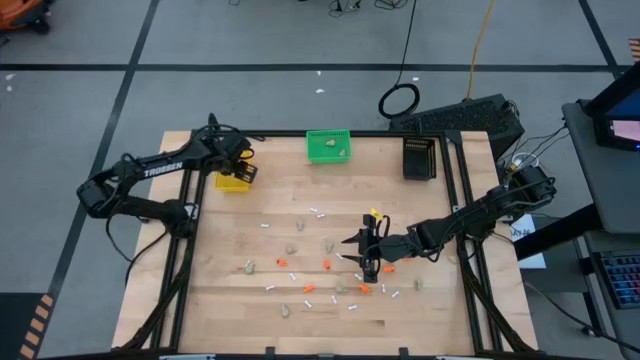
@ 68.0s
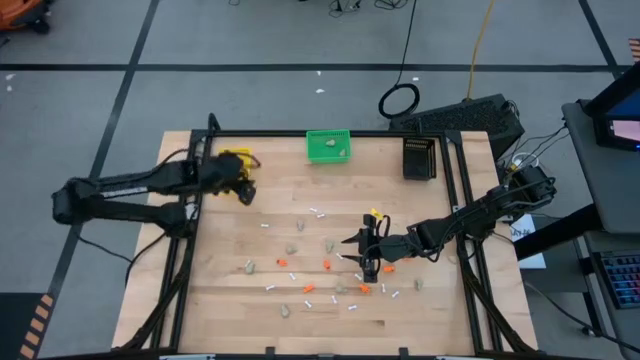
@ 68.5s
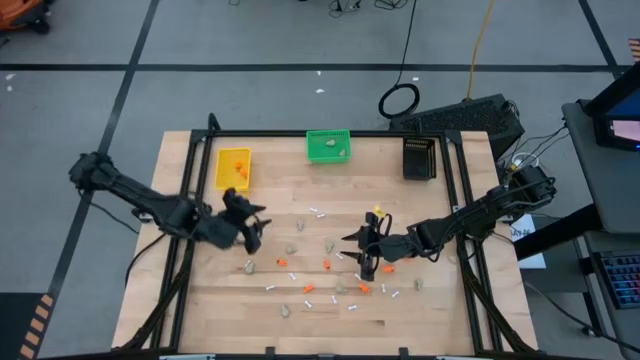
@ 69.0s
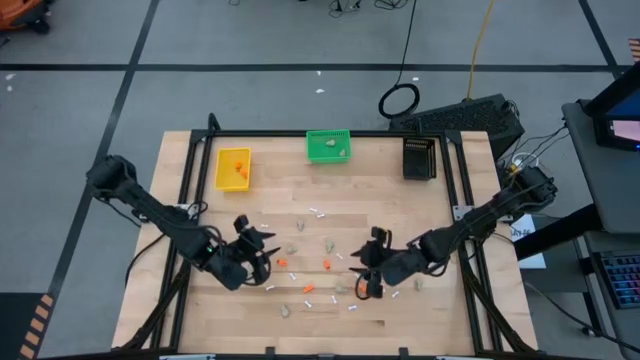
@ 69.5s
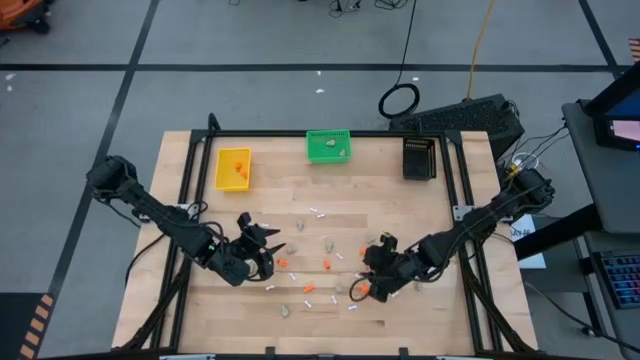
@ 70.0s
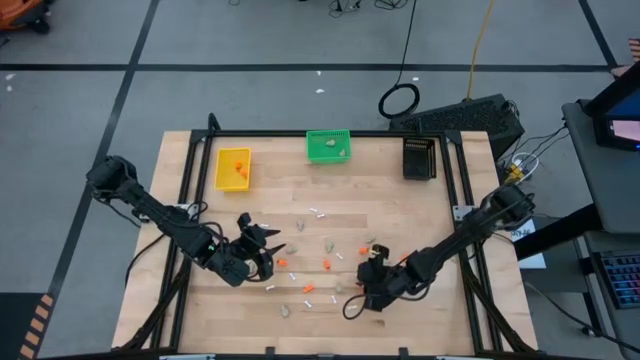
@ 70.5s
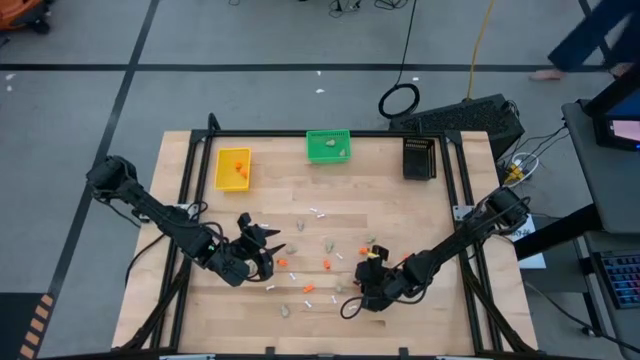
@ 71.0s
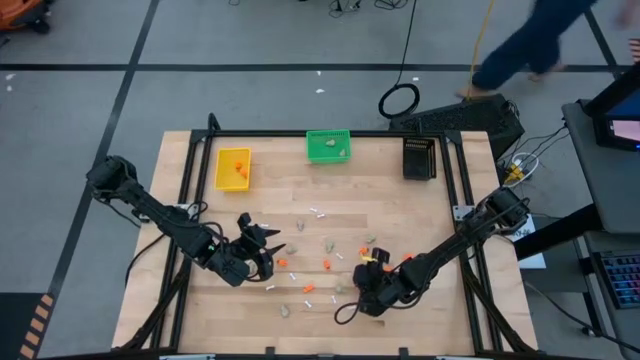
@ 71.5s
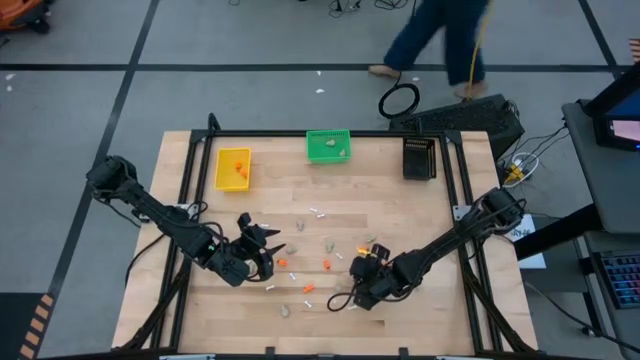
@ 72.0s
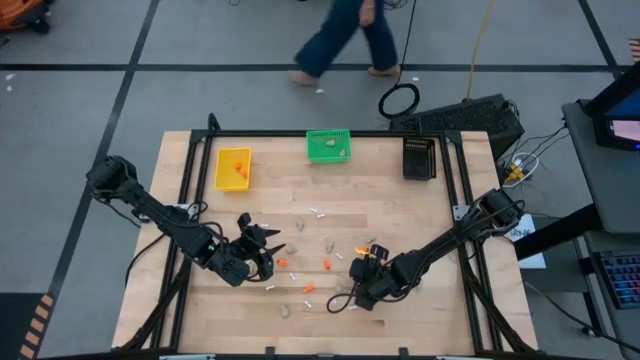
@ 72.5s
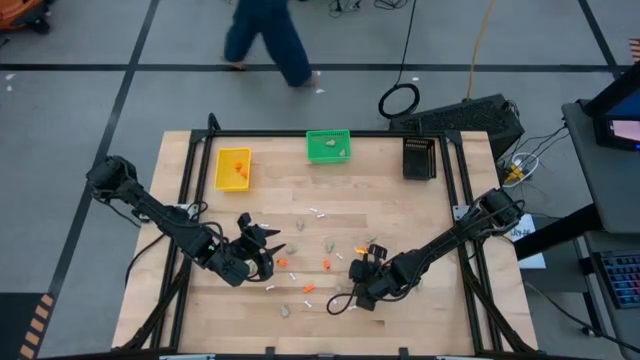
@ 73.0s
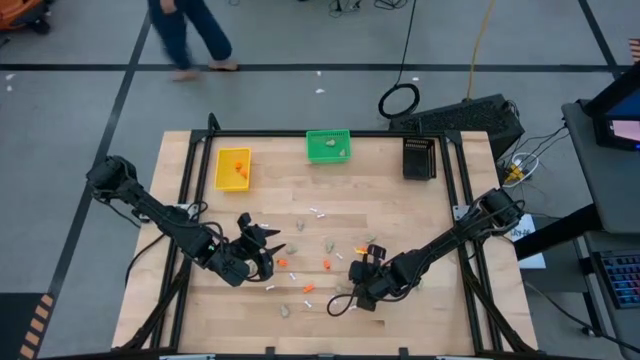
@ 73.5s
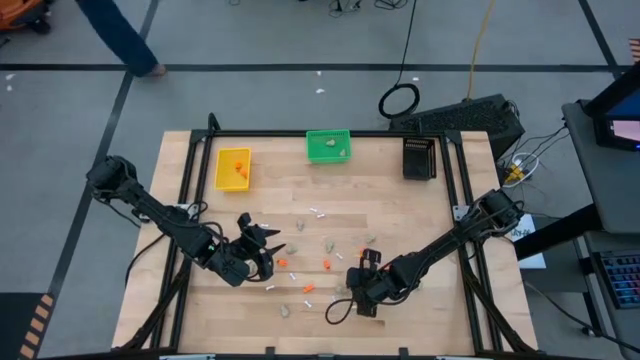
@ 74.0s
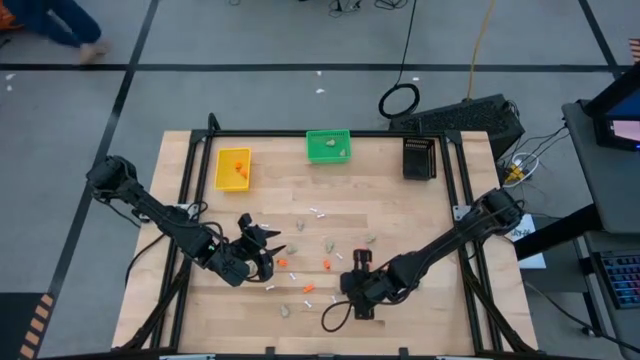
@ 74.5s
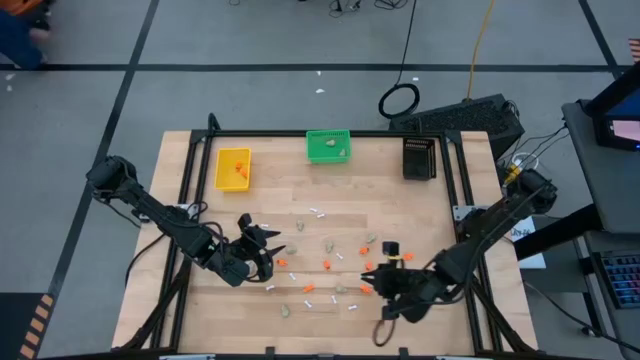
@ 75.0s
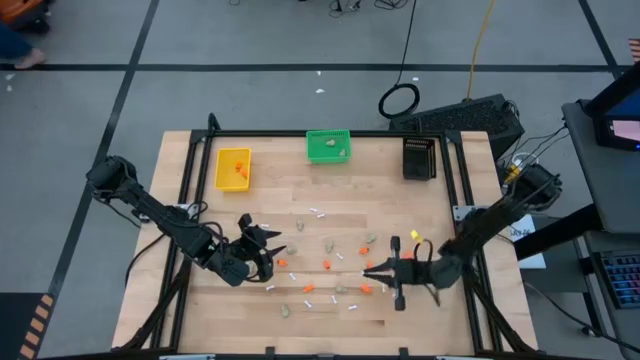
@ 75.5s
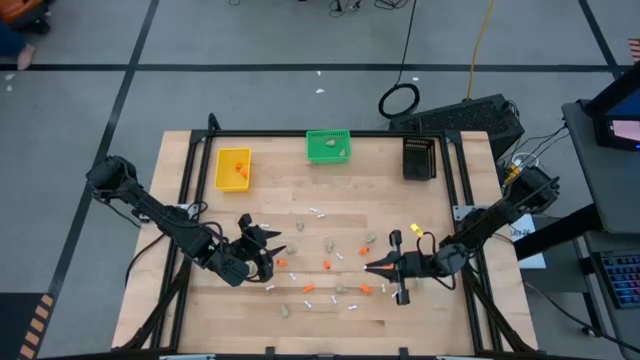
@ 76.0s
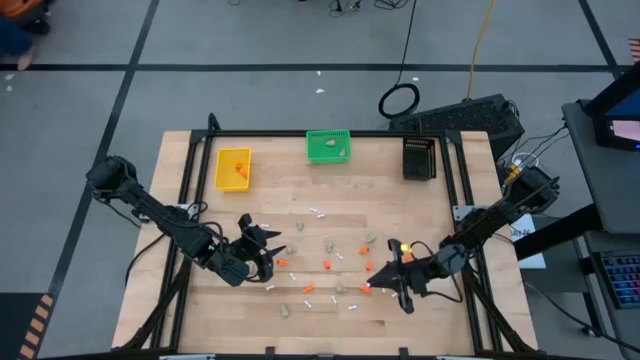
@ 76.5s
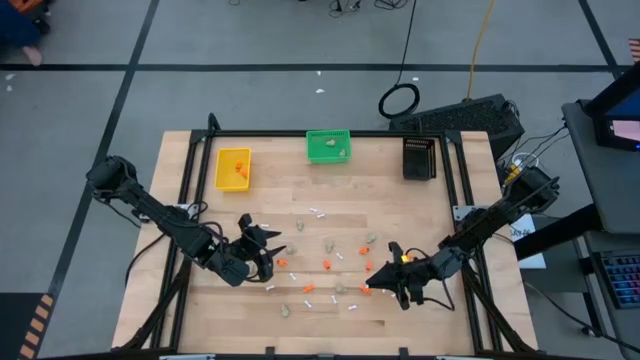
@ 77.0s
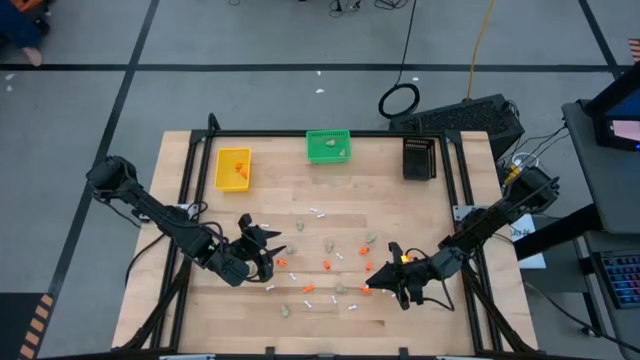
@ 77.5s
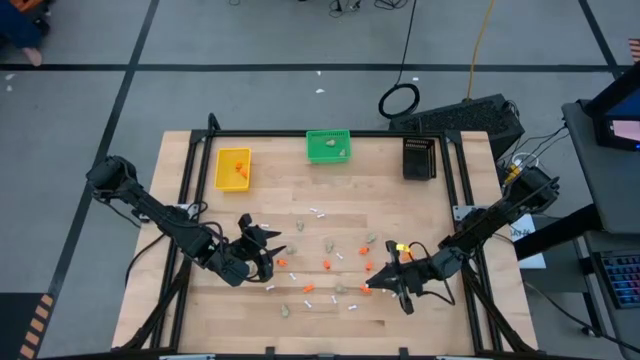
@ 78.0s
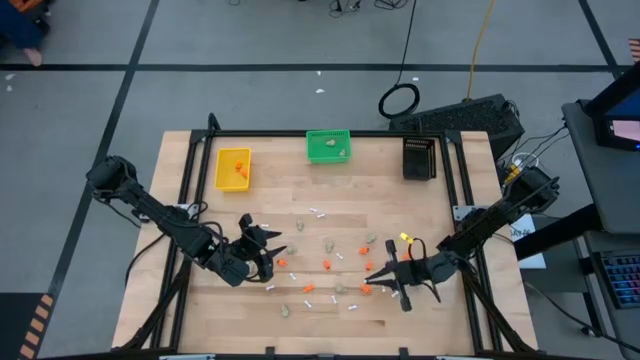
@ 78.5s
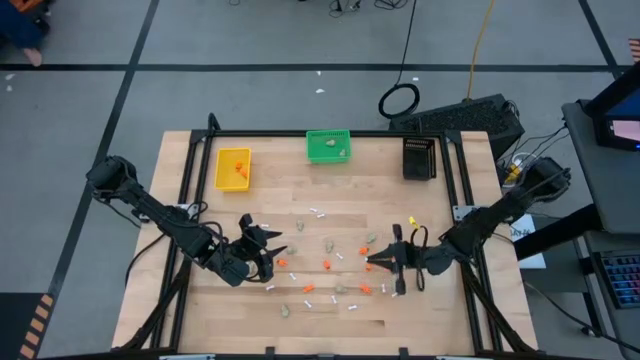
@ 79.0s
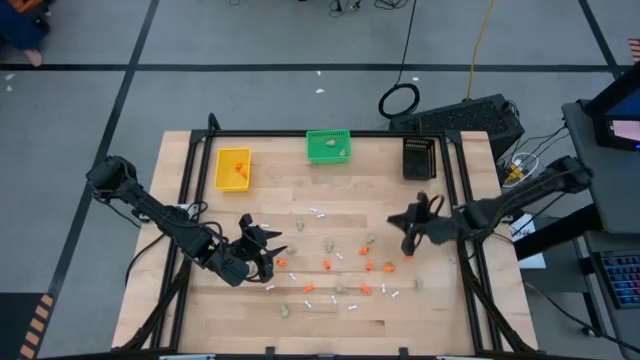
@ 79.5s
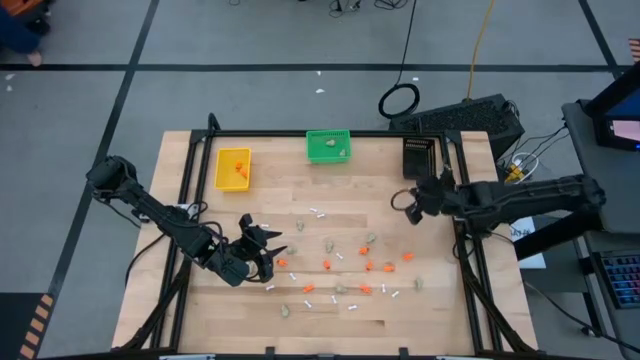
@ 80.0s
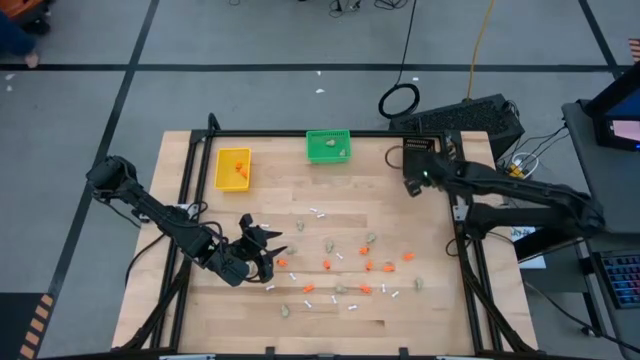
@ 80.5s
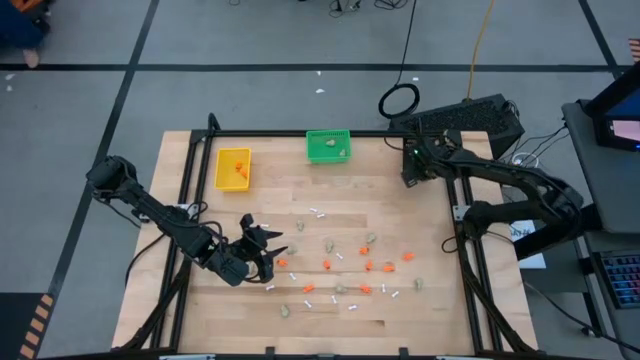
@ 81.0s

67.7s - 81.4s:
Task: Sort Halloween decoration
Put the white bone toy into the black bin

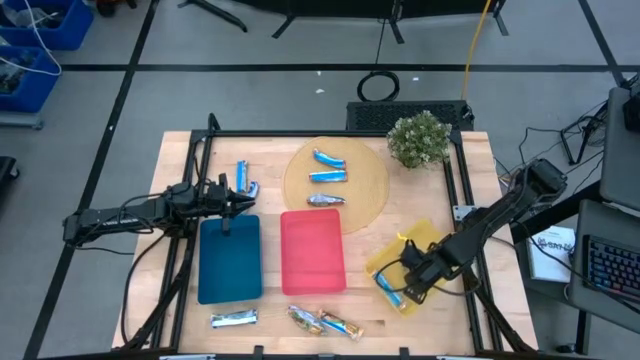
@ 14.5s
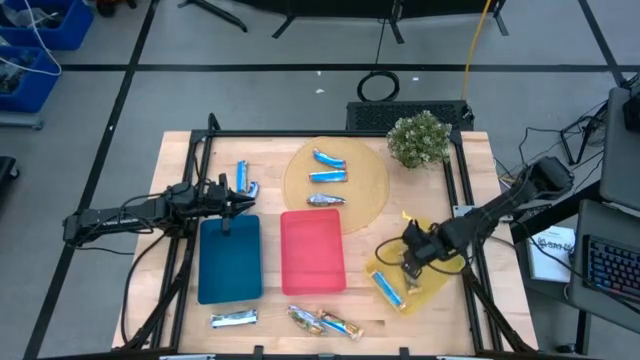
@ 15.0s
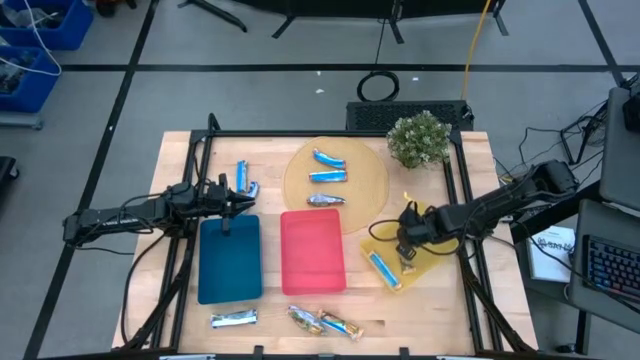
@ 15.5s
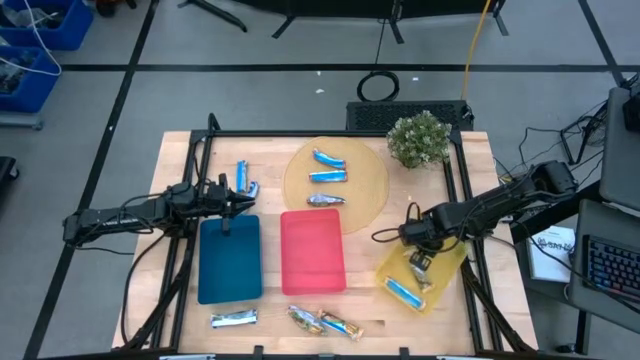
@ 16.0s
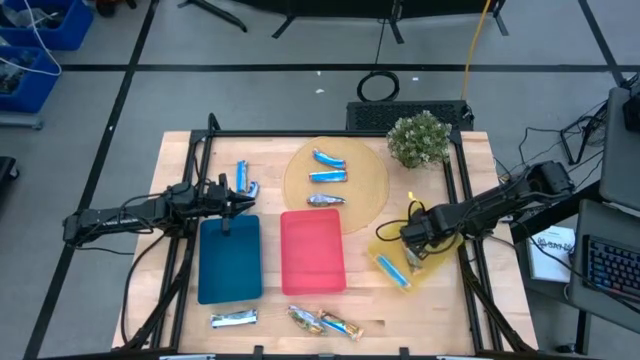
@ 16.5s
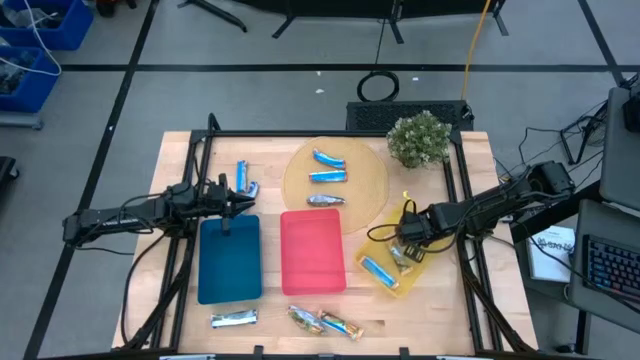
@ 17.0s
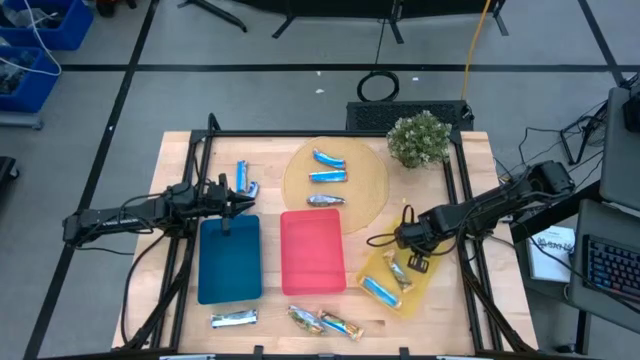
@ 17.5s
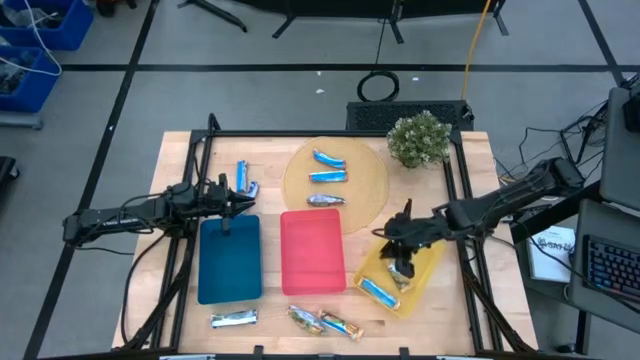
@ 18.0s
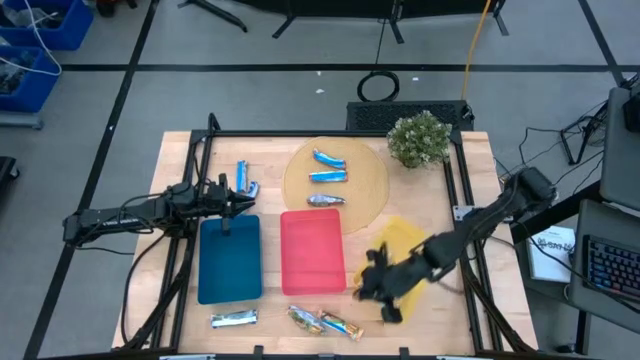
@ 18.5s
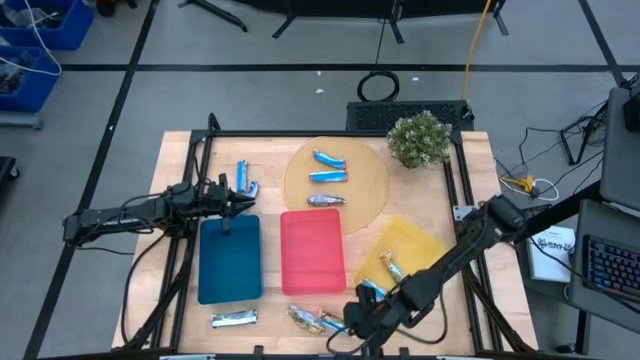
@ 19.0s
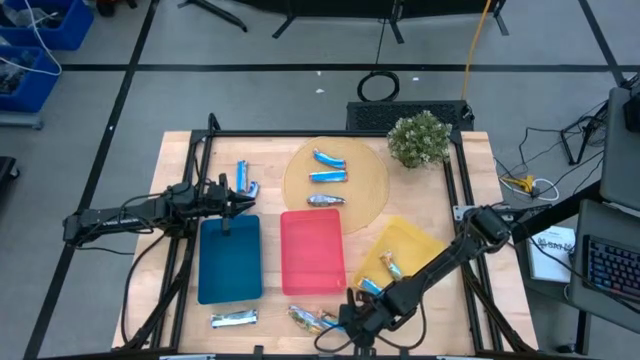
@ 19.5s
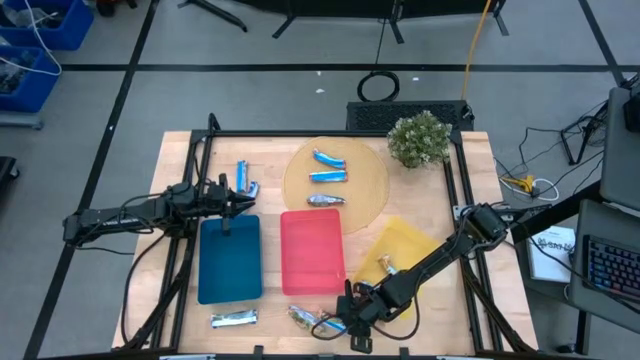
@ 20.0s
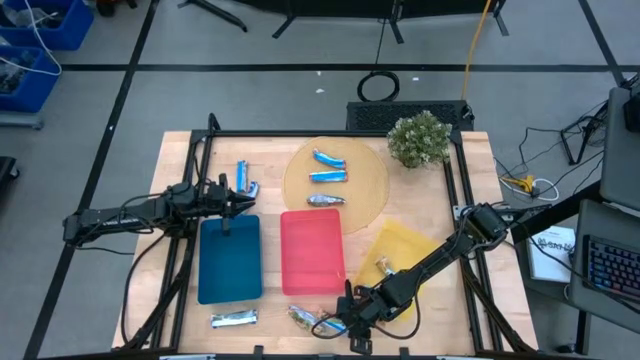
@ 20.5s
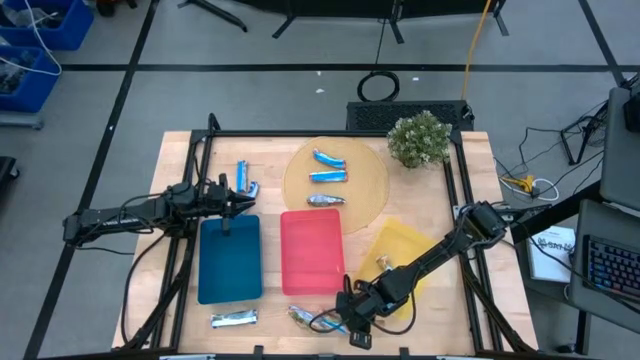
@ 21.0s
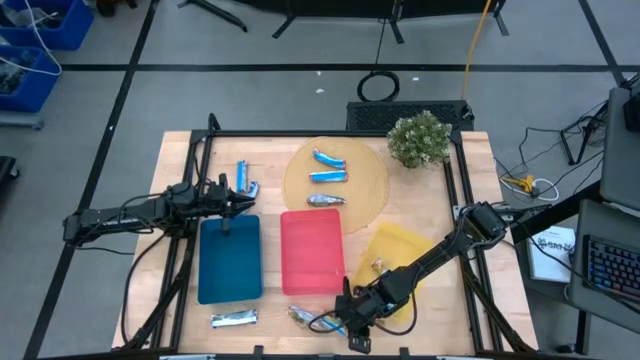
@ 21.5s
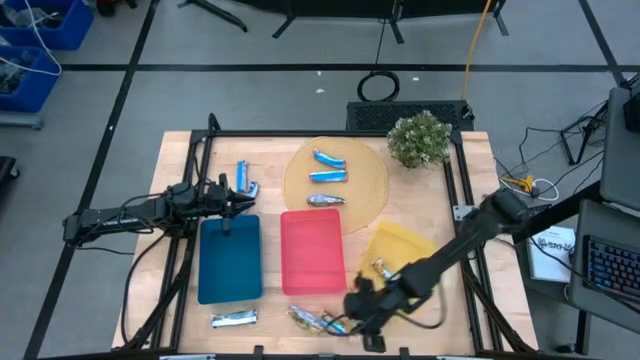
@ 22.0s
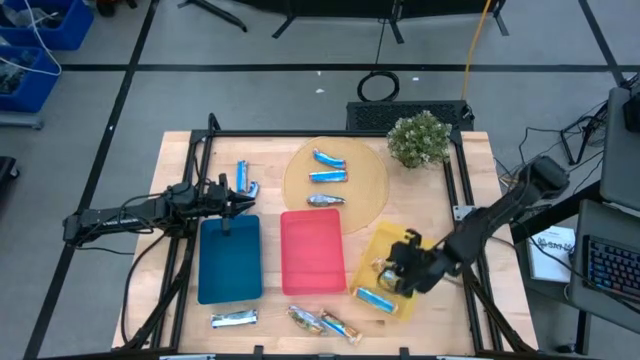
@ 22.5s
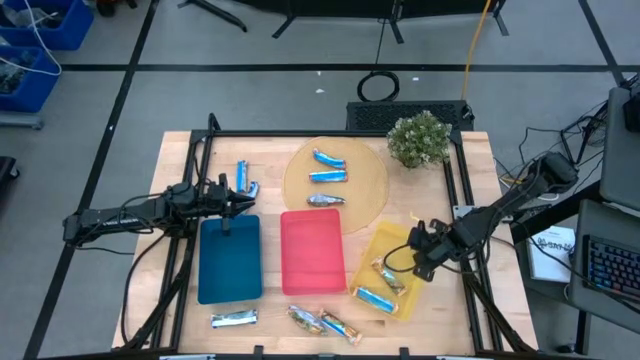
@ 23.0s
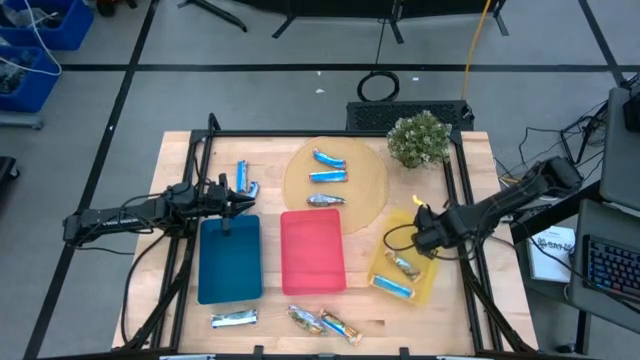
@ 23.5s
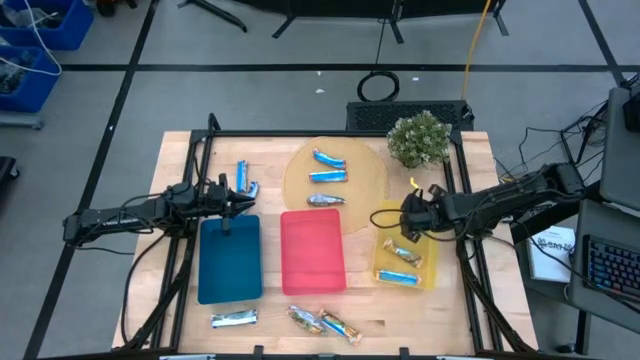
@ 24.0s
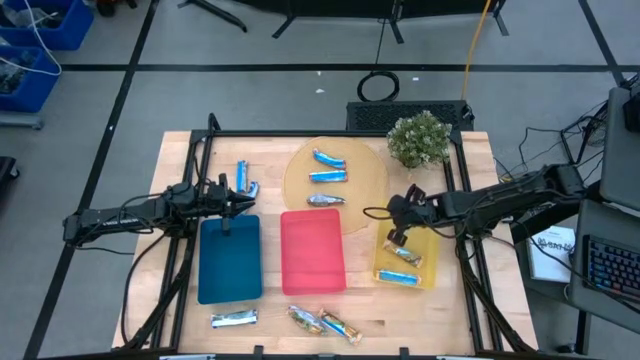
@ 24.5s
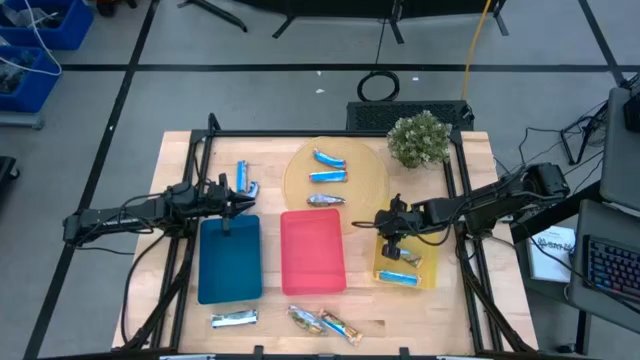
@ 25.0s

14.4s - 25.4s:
Task: Pick and place Granola Bars by type
Adjust the yellow bin
